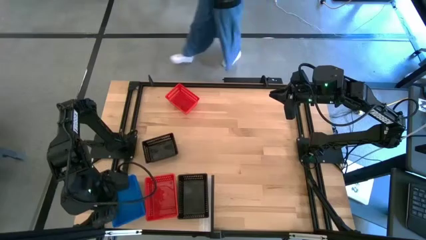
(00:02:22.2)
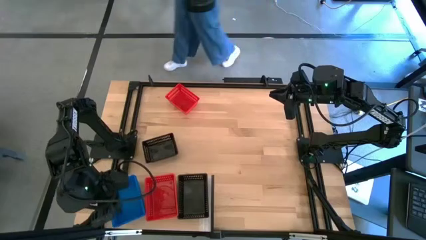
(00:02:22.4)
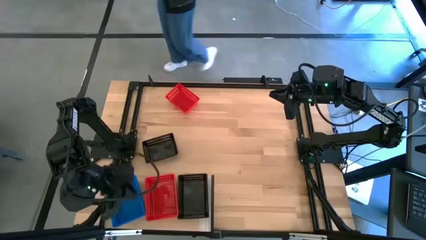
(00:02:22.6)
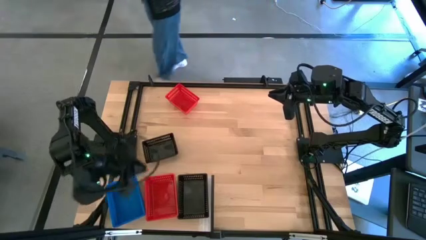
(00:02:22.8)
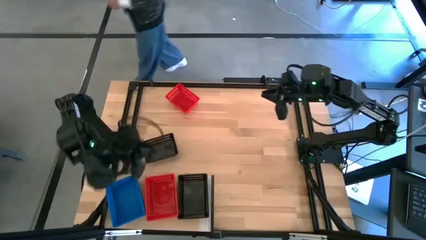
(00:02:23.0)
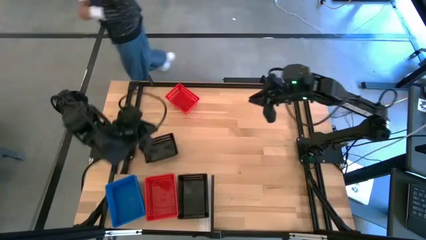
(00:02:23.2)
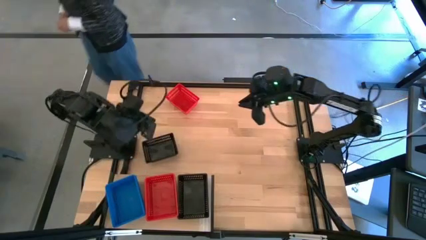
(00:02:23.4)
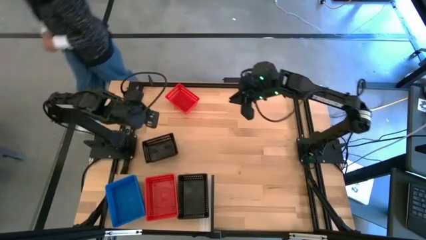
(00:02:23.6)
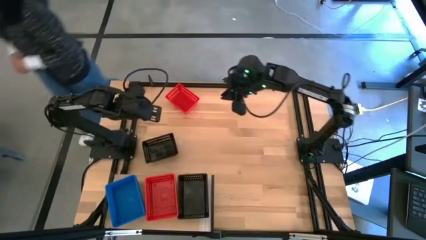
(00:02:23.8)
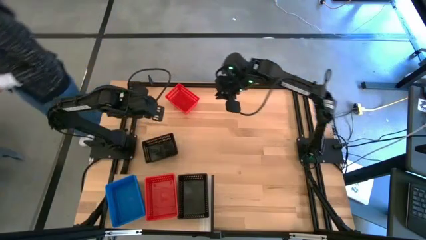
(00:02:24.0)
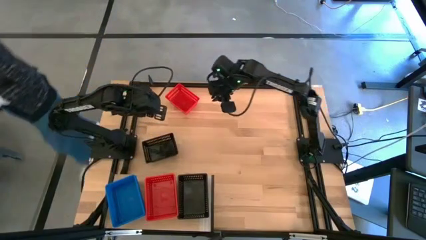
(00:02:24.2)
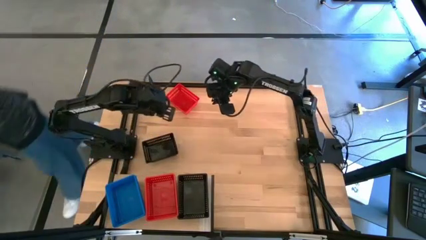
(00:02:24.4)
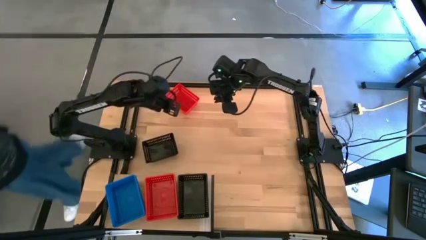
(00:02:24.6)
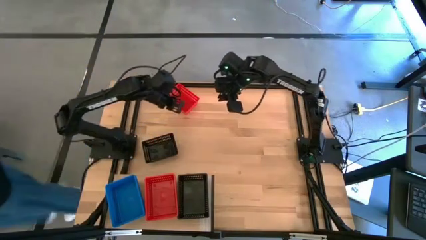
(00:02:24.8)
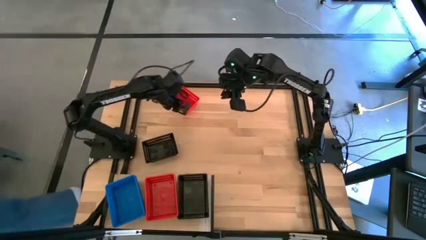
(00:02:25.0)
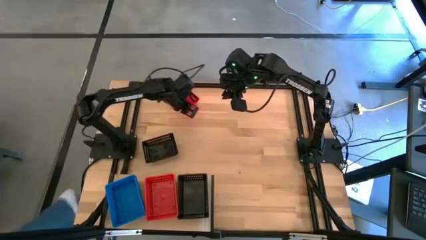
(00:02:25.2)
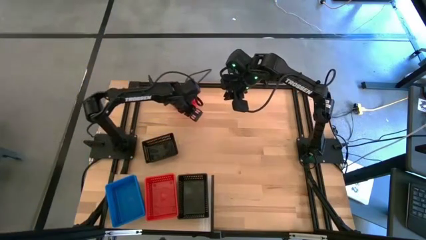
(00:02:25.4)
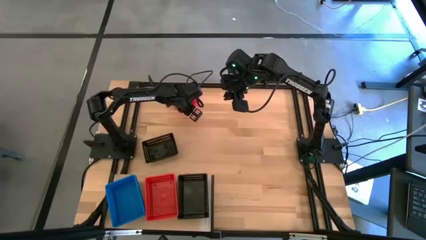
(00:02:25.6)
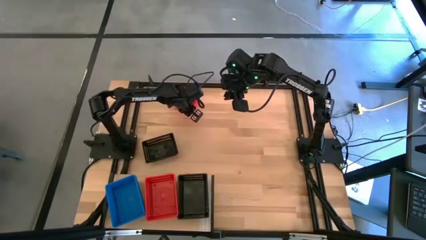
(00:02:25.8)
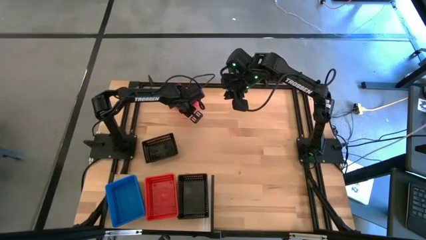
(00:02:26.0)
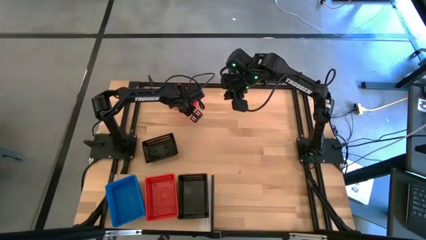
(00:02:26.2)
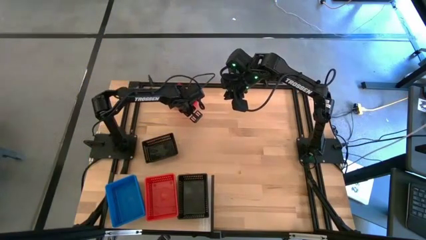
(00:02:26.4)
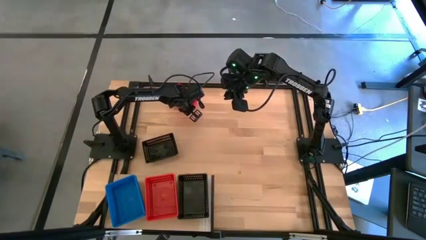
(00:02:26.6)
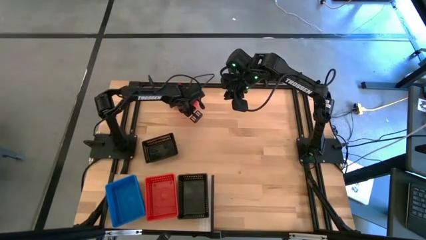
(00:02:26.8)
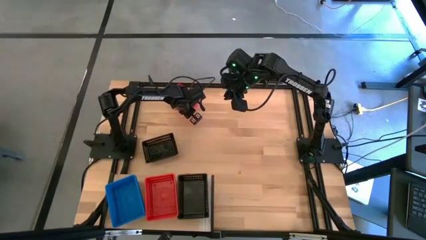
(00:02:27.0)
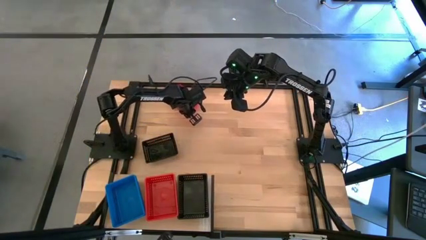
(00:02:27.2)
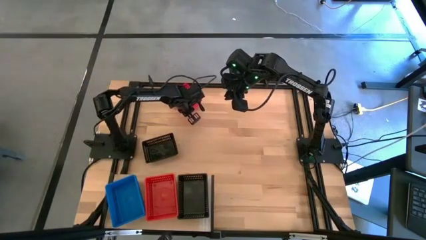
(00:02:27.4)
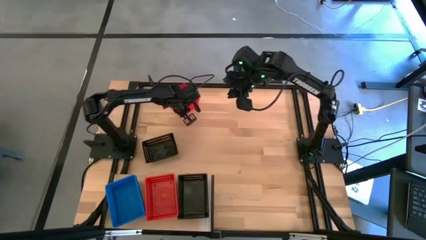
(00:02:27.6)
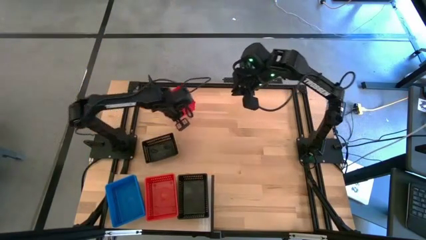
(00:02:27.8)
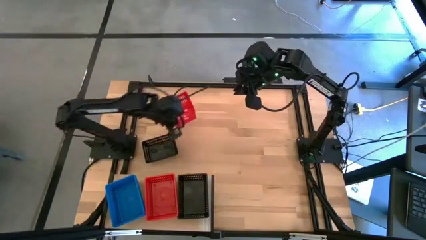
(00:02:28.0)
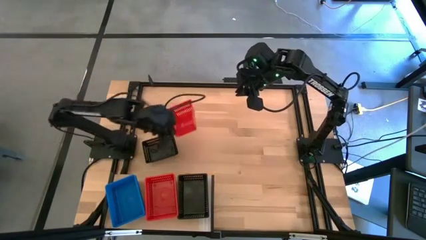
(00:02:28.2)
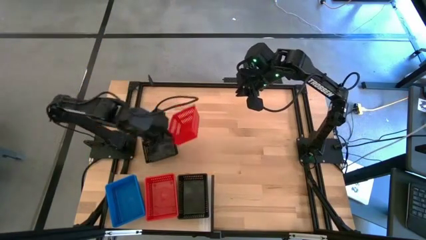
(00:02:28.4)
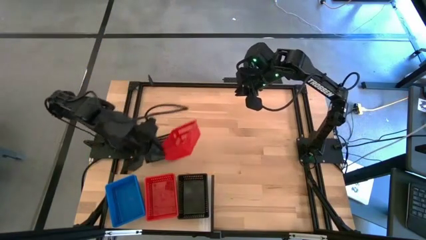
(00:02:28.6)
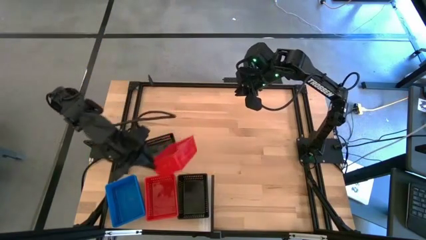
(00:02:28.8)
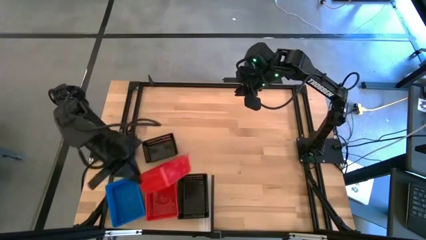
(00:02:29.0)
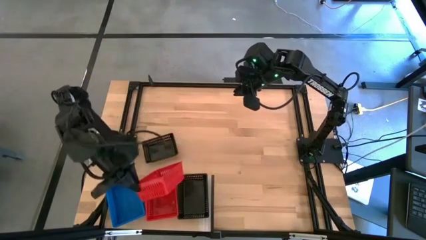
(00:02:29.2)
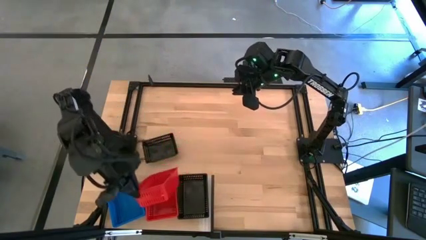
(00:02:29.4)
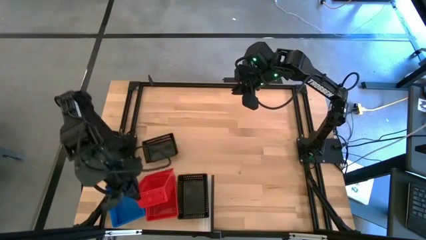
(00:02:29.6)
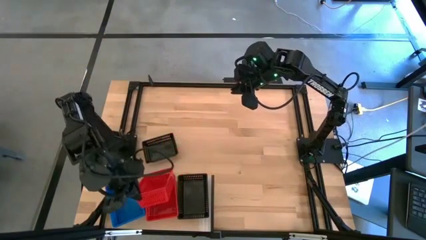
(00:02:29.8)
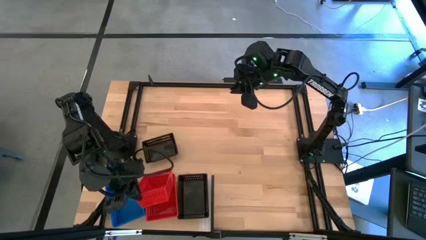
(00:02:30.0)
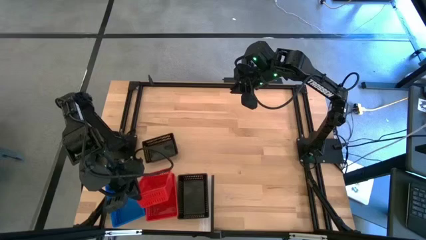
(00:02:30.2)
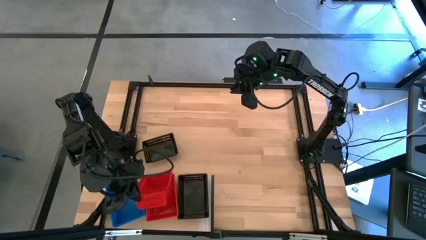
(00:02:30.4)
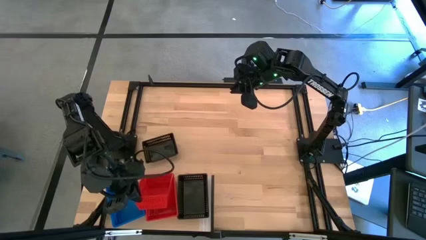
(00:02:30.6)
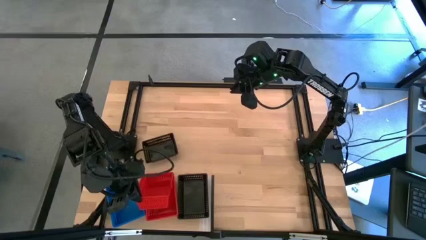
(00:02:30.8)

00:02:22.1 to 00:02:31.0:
Task: Stack baskets on shelf by color
Stack the red bin on top of the other red bin on the shelf

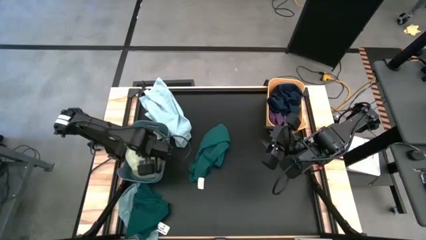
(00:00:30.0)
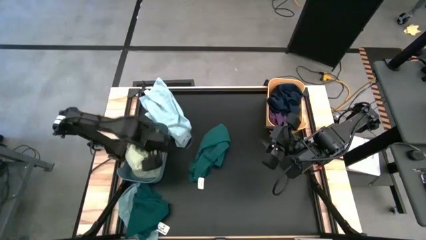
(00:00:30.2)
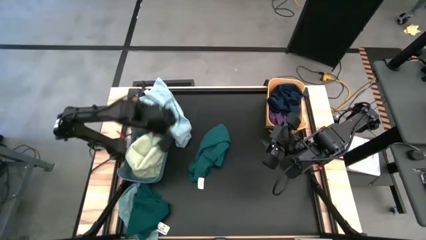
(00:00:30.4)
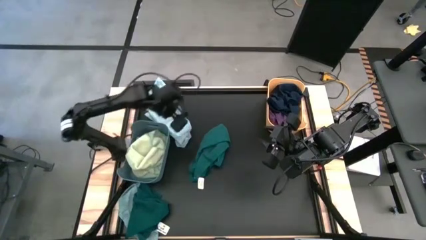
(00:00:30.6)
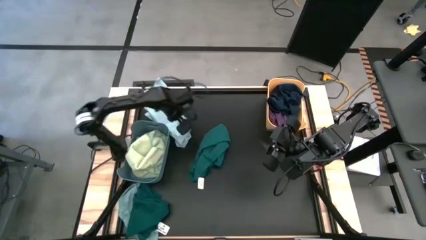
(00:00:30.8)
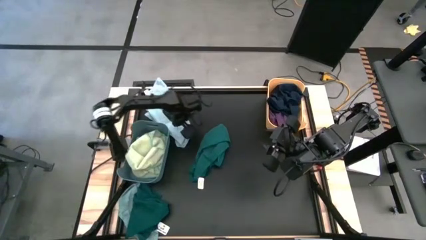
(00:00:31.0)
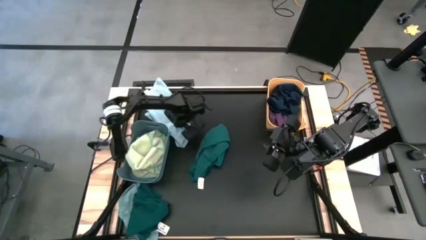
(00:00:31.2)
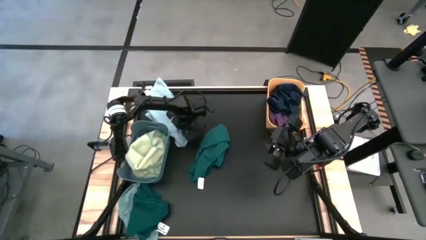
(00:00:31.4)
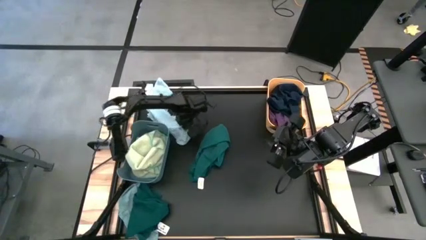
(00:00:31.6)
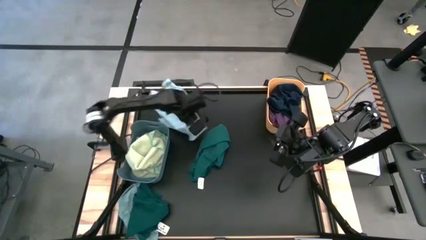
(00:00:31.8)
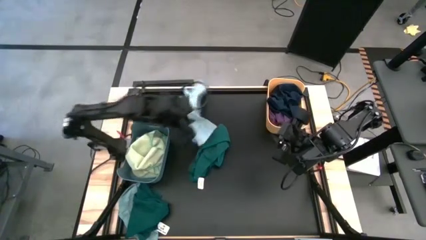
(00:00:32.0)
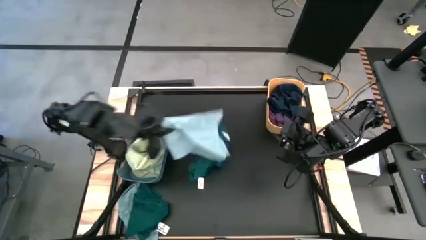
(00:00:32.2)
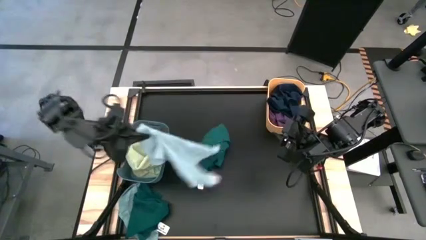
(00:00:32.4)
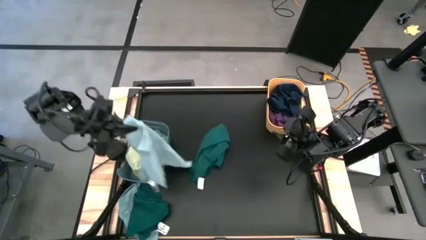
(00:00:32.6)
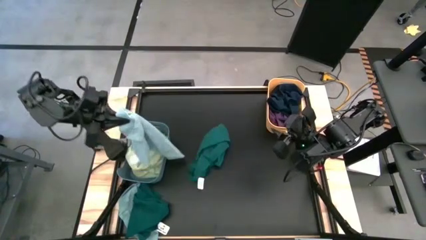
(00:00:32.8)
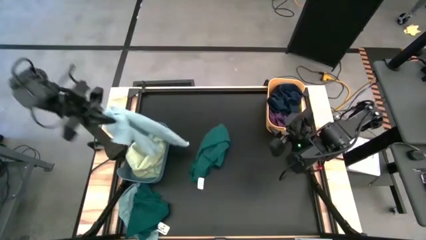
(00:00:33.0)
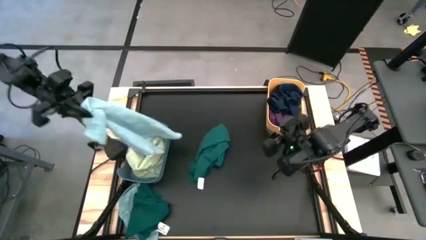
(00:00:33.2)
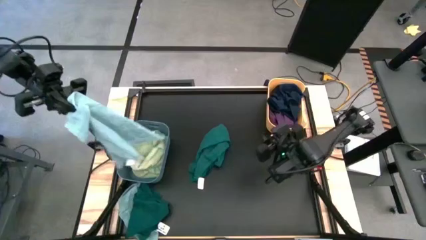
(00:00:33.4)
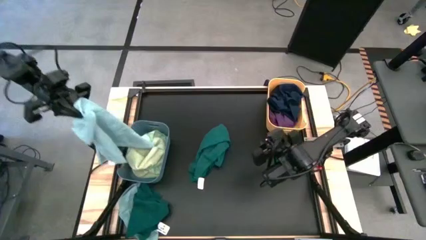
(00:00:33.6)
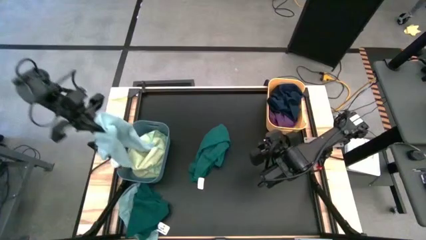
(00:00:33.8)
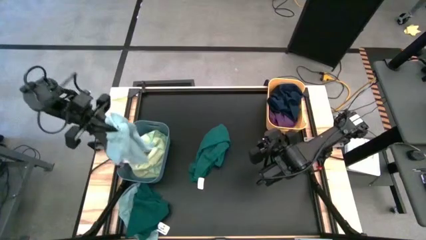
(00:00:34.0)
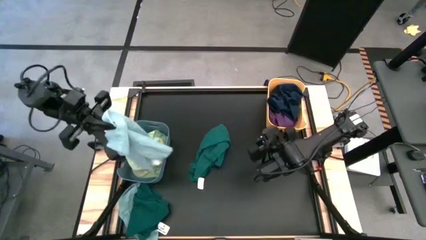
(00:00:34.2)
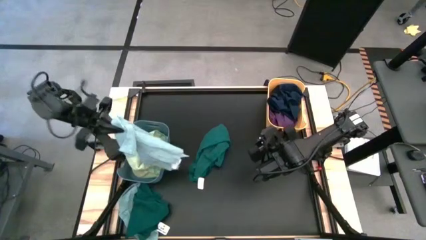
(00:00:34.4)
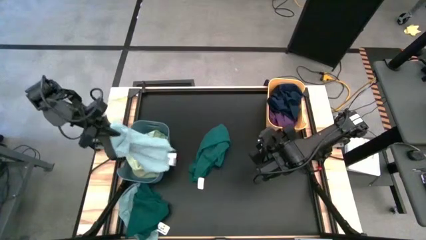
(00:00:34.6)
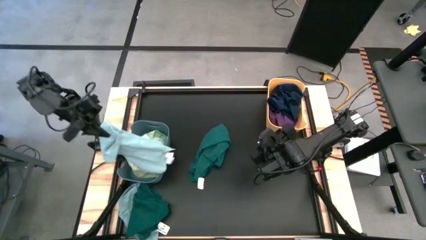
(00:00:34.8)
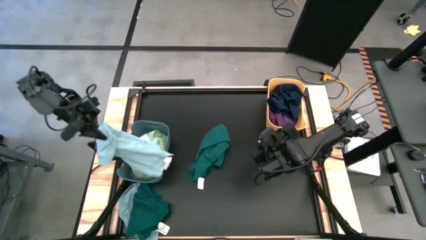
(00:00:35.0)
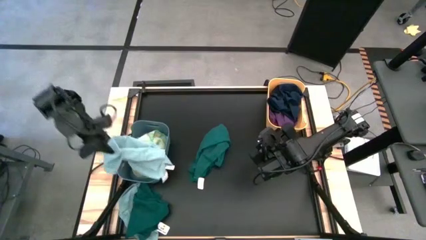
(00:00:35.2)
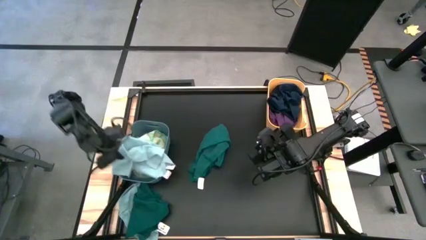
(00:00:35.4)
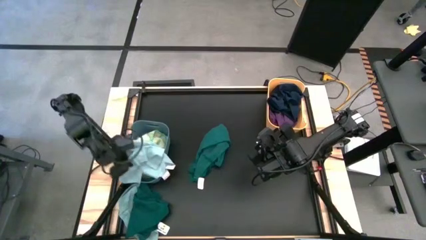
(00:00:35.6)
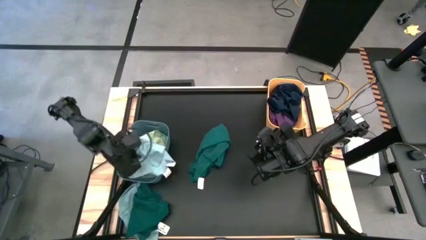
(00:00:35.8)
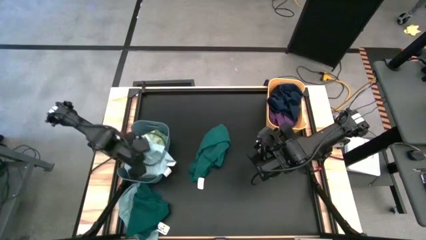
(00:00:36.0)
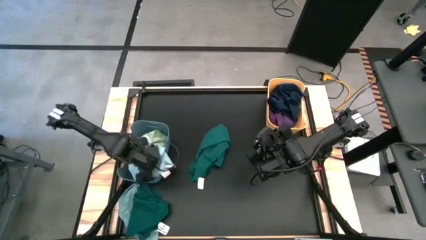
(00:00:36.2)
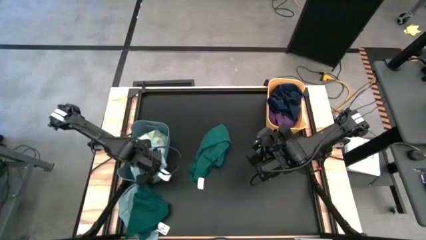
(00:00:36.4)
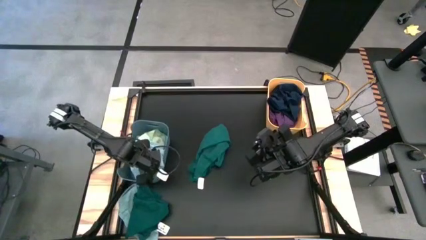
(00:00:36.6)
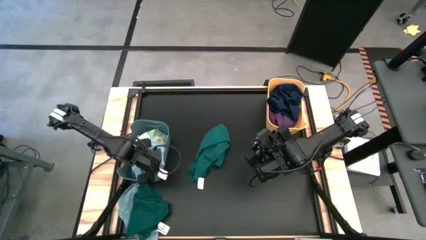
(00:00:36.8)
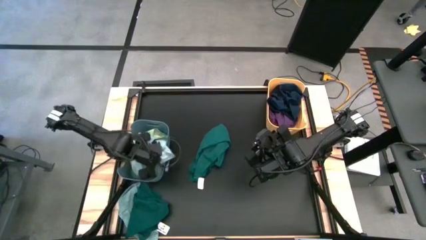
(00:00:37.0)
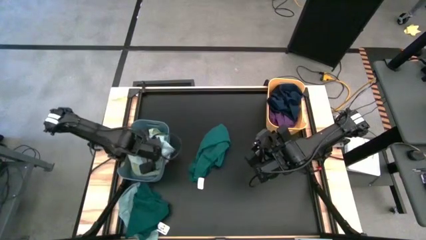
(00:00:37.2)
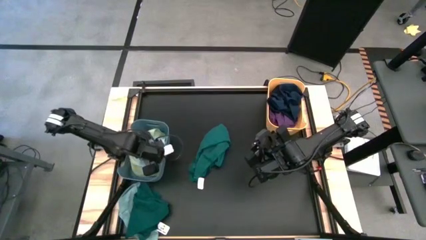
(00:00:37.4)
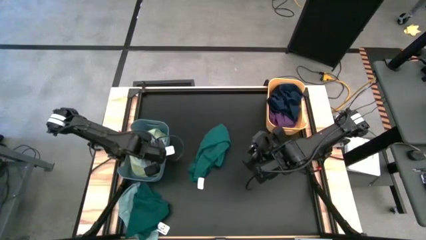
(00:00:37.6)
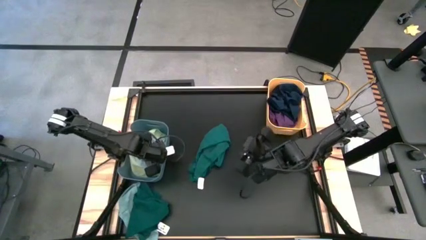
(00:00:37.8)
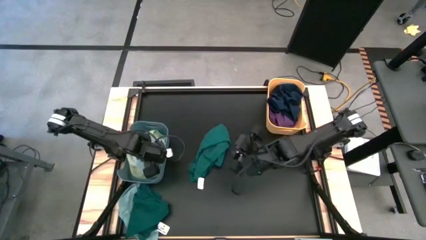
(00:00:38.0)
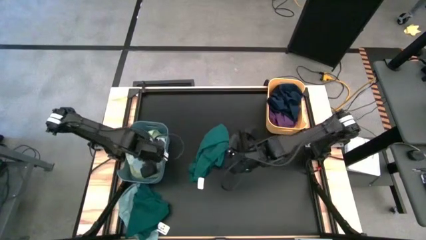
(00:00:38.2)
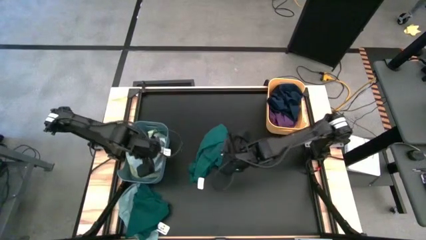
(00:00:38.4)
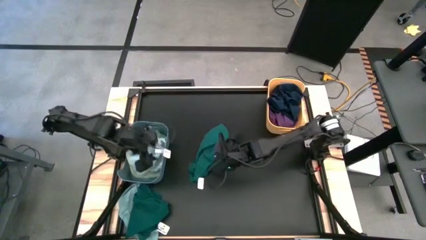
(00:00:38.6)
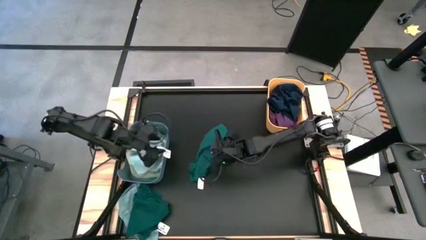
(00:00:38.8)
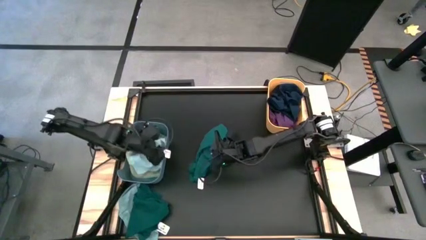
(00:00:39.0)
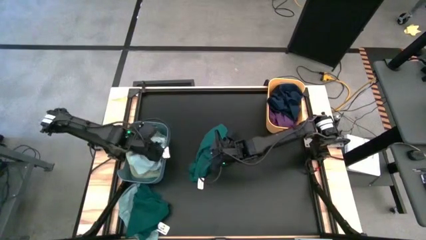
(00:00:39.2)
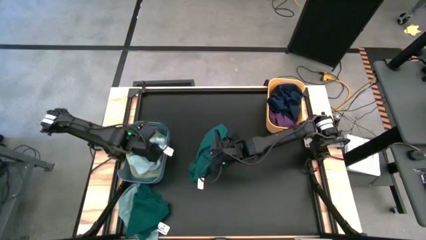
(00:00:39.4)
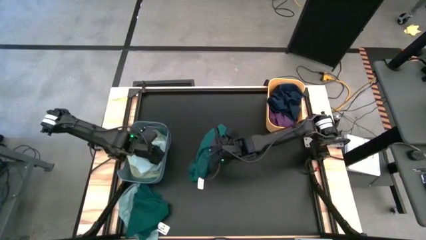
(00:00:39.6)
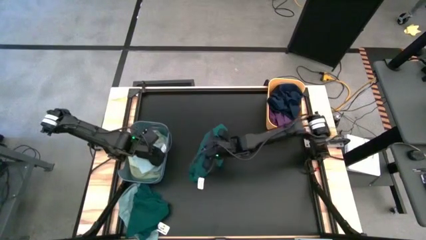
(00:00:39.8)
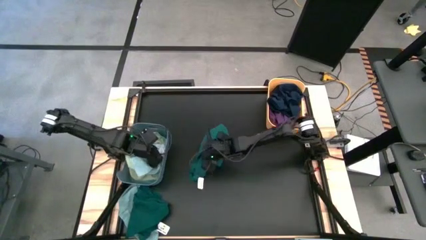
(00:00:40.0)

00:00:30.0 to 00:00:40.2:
Task: Sort towels by color in basket
Put the top light blue towel into the blue bin
